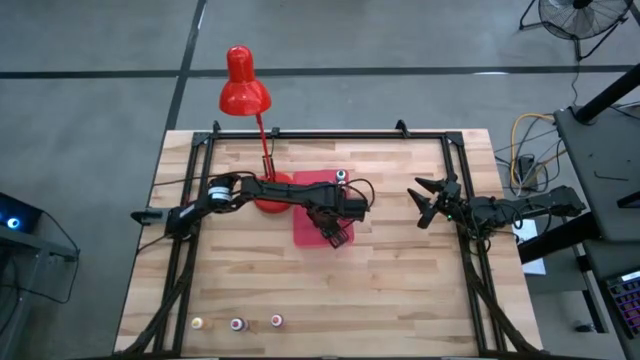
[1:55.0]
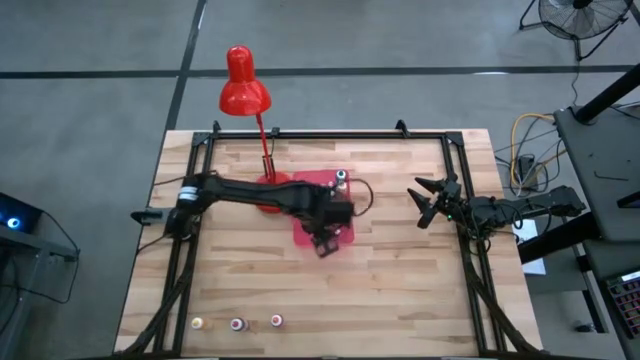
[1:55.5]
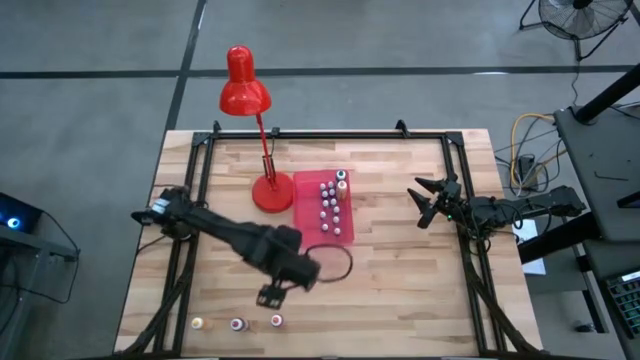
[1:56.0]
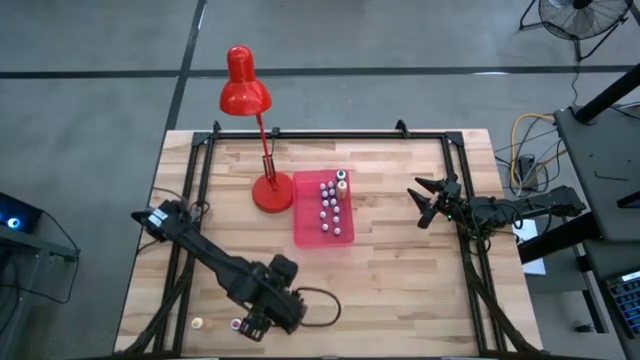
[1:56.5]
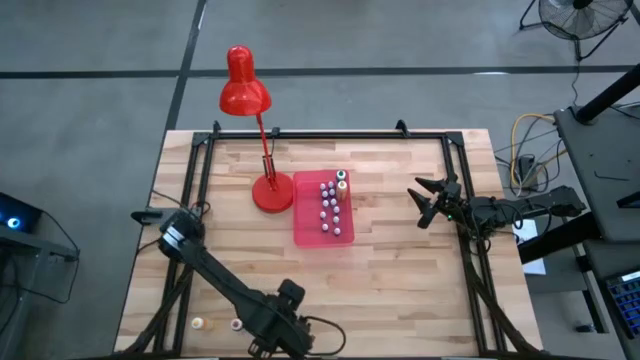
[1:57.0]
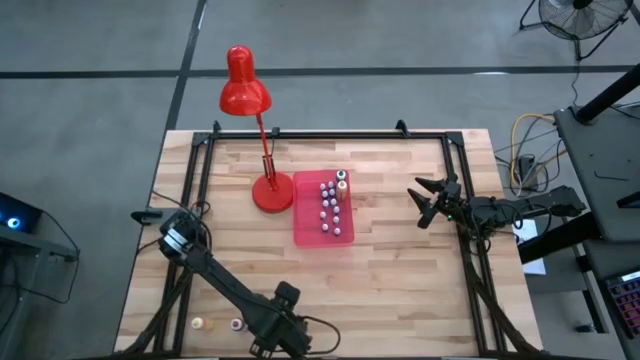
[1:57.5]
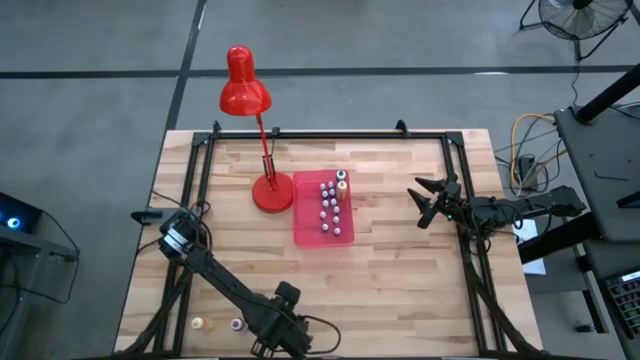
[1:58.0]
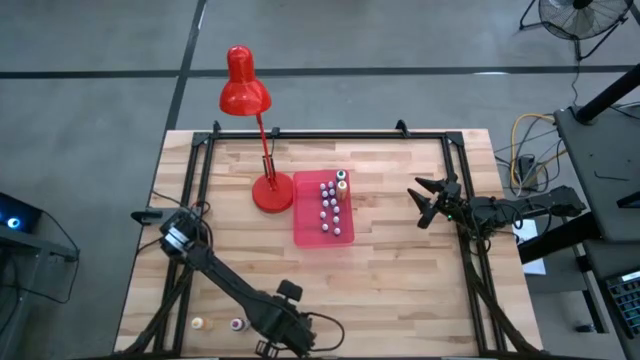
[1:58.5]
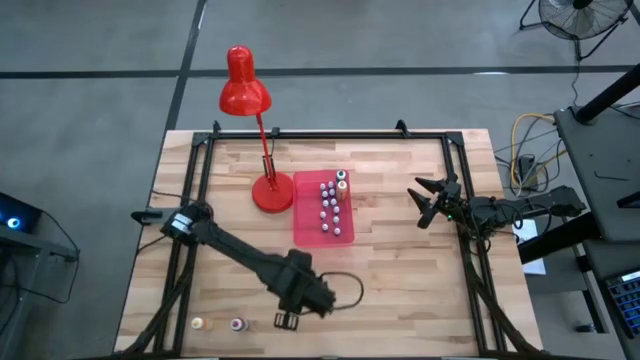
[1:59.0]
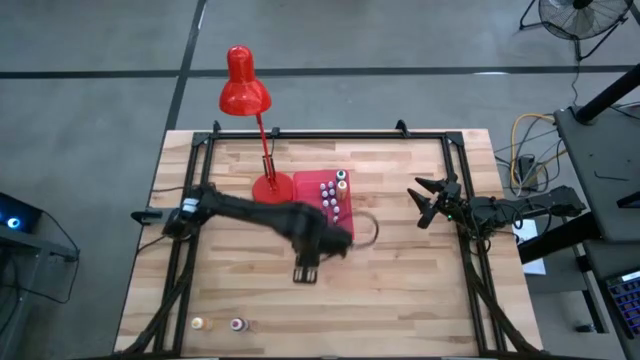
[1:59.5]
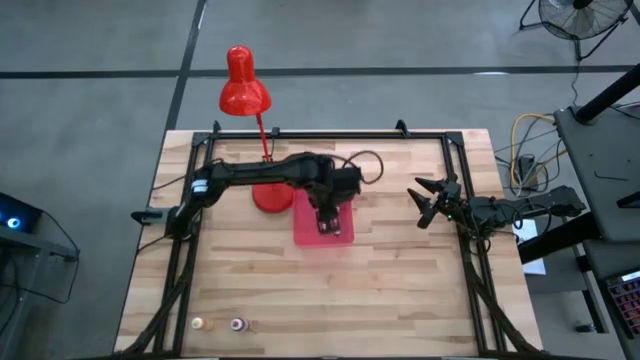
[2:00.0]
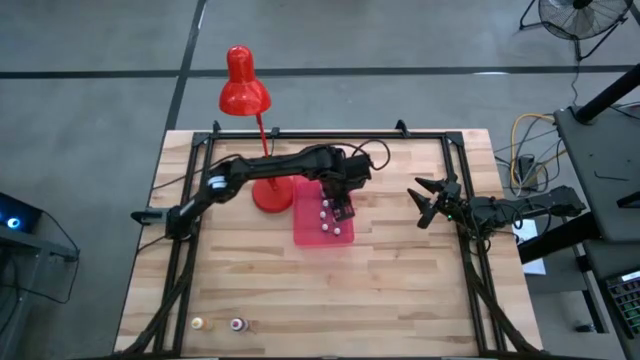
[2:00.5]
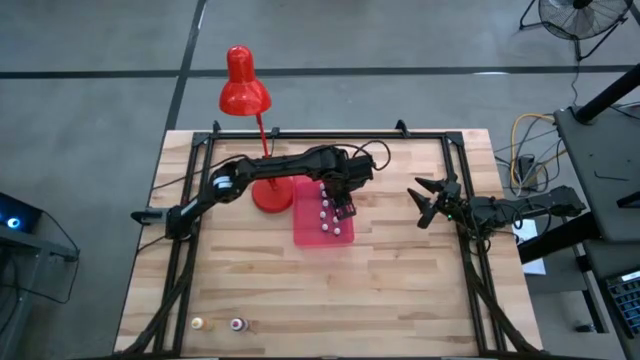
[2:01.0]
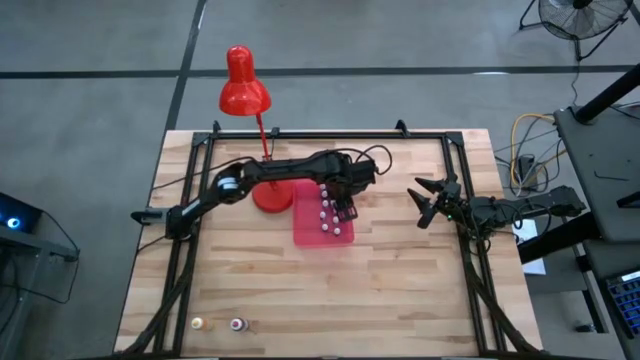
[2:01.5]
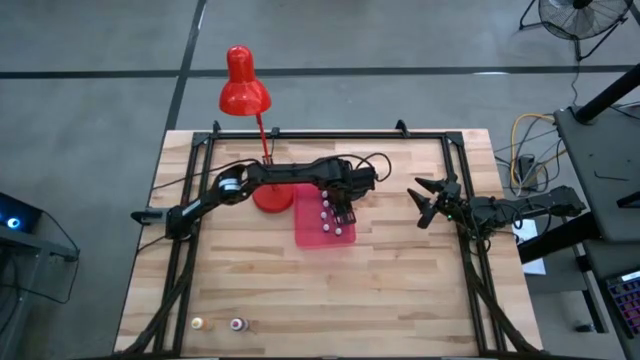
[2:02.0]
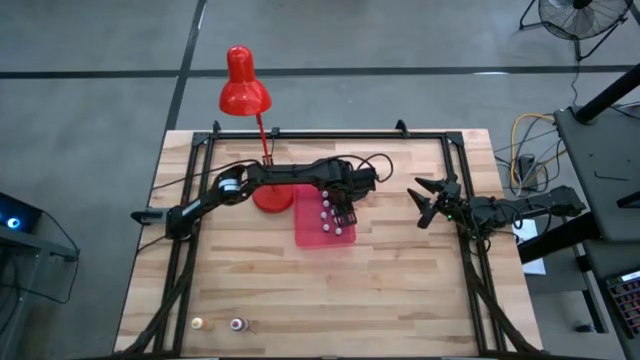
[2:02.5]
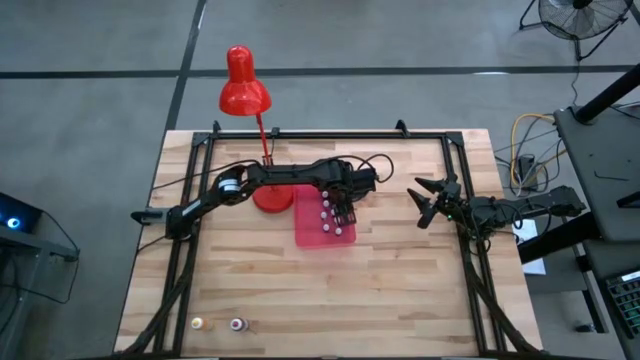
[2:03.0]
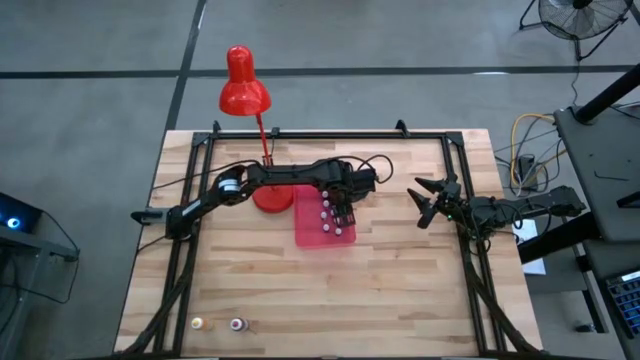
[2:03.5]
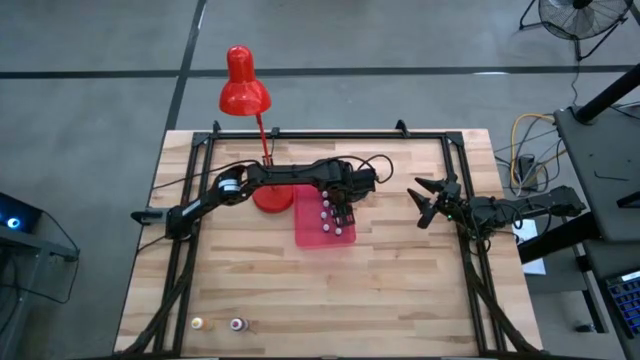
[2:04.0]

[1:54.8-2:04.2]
Task: Pick & Place food coloring
Put the big orange food coloring bottle into the bin

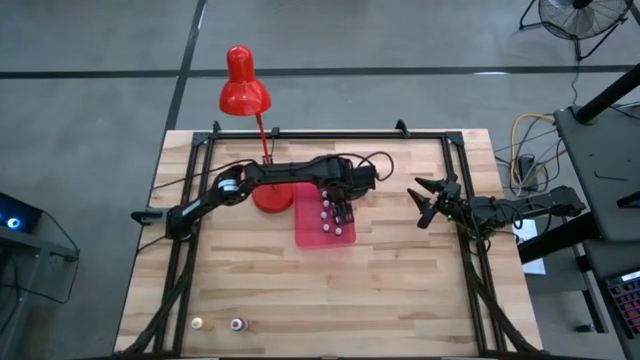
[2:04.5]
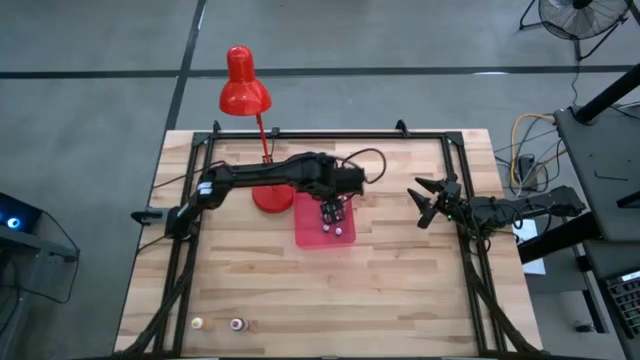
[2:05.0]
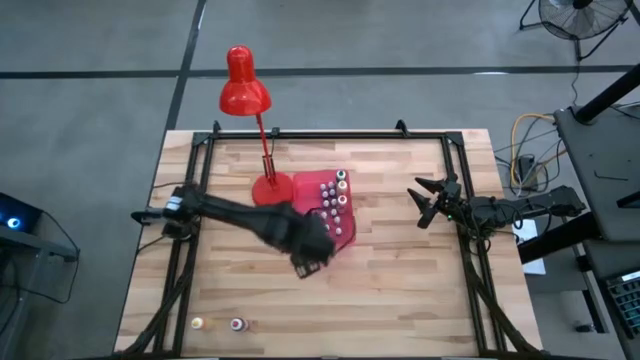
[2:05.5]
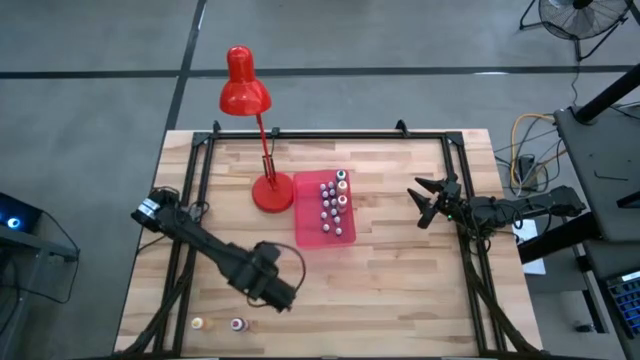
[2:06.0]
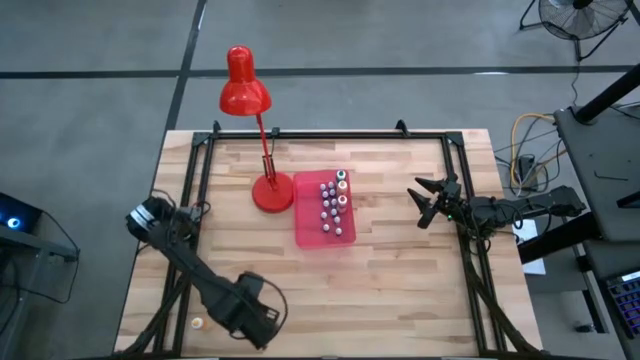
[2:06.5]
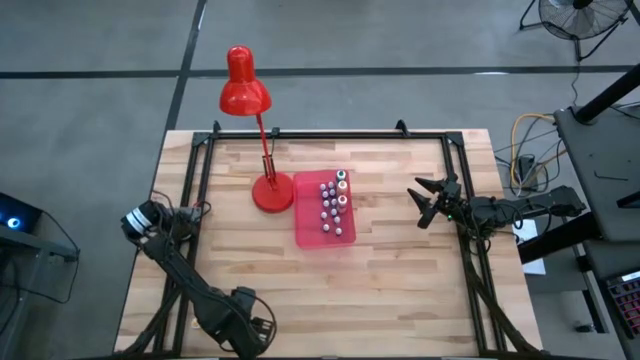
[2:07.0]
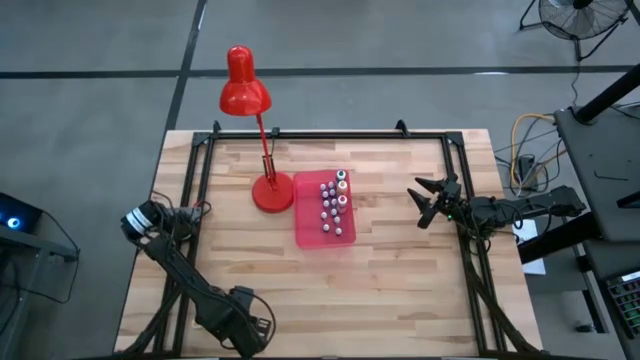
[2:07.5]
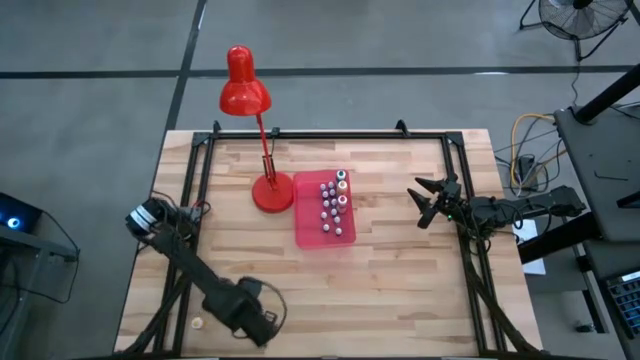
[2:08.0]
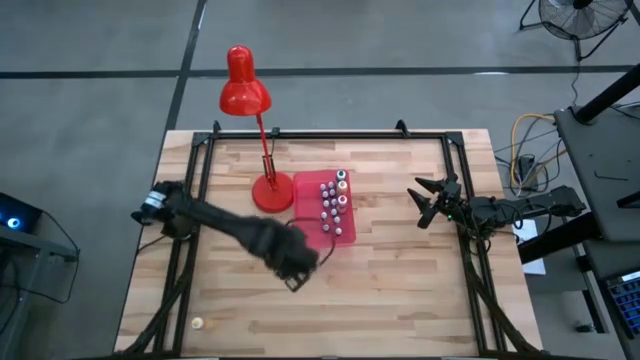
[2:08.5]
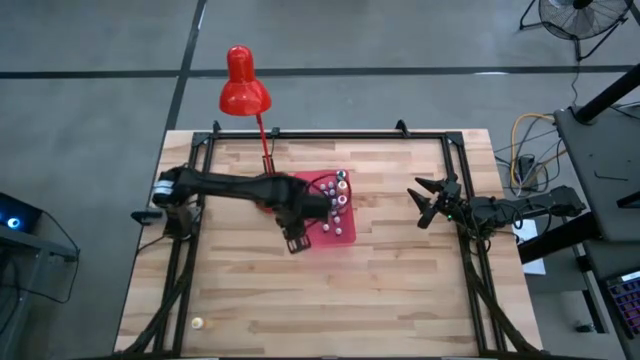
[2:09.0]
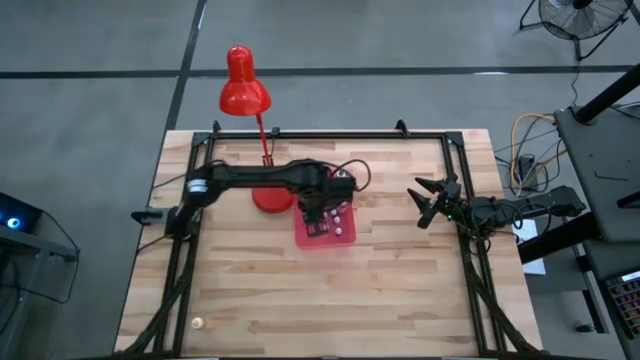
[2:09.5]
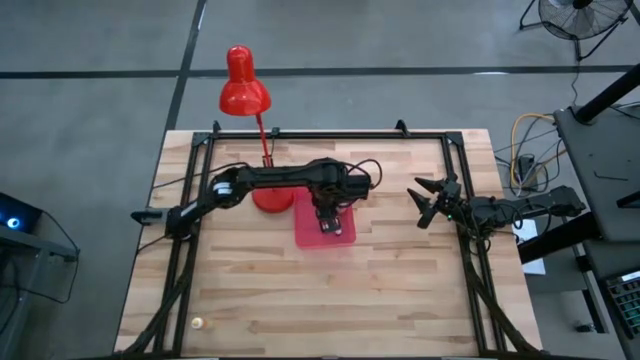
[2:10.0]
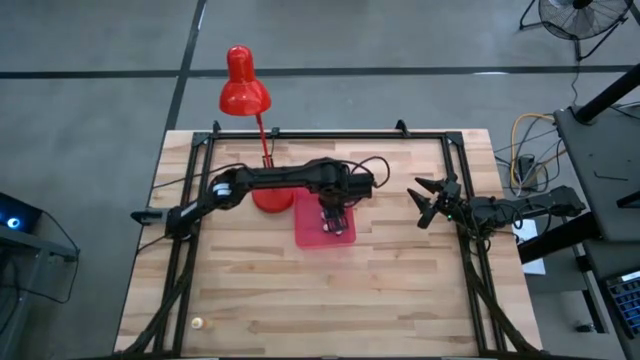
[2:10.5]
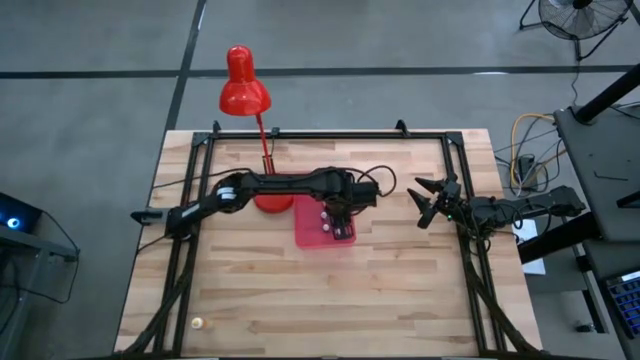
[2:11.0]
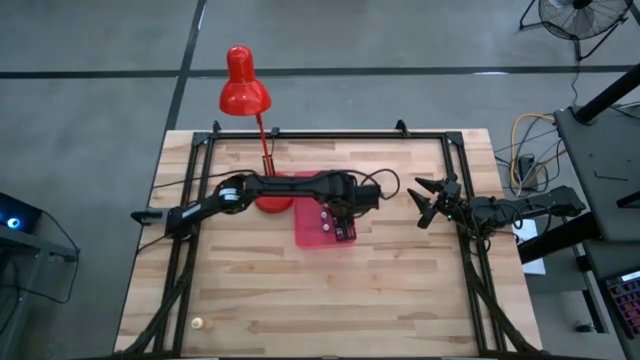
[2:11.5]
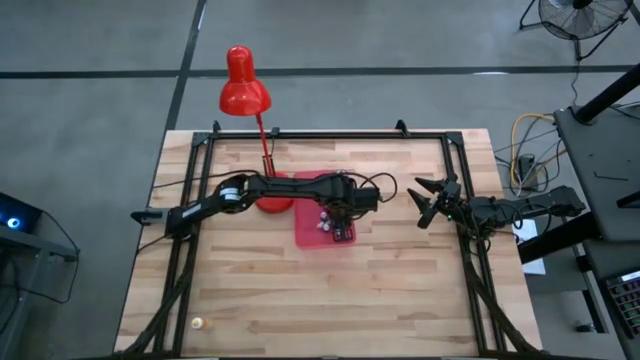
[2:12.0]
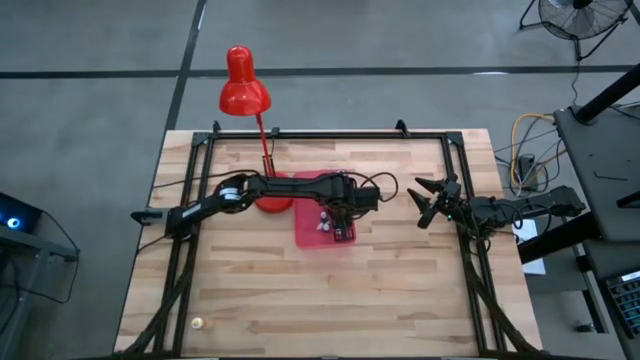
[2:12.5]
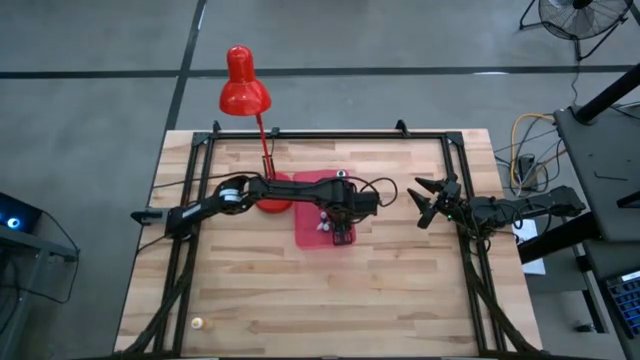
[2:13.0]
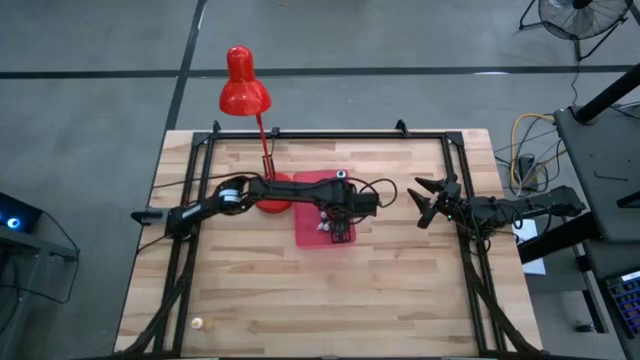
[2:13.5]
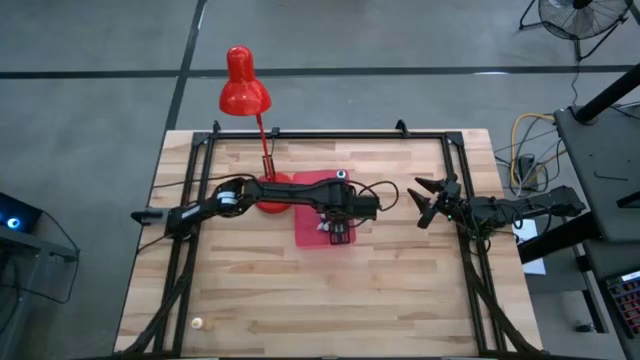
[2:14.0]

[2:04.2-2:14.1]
Put the big red food coloring bottle into the bin

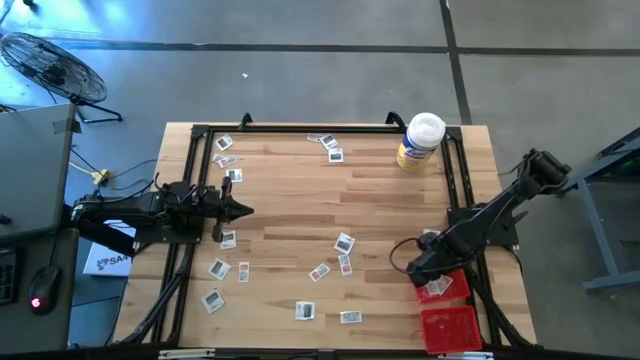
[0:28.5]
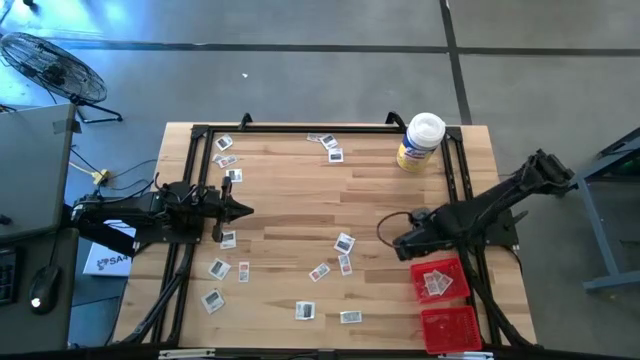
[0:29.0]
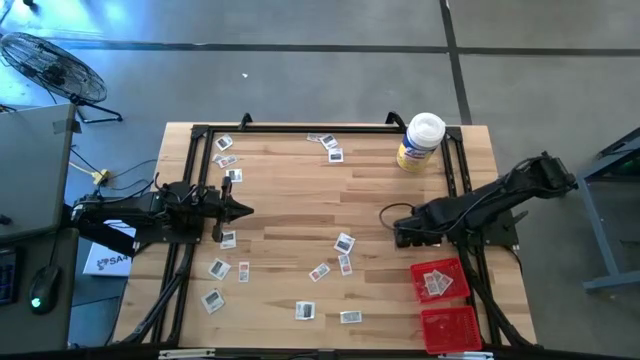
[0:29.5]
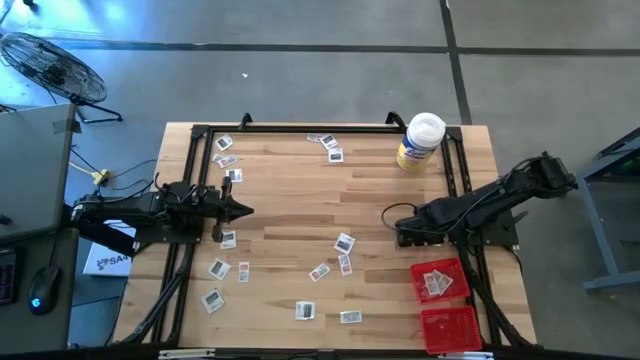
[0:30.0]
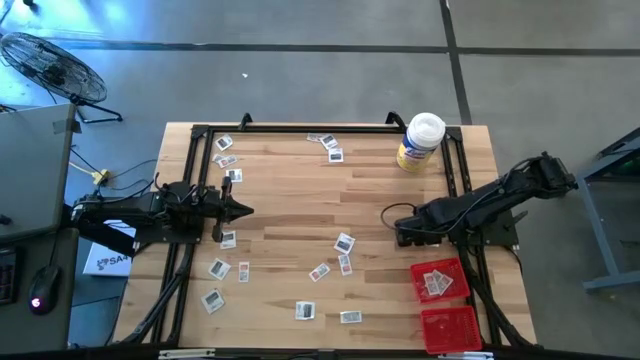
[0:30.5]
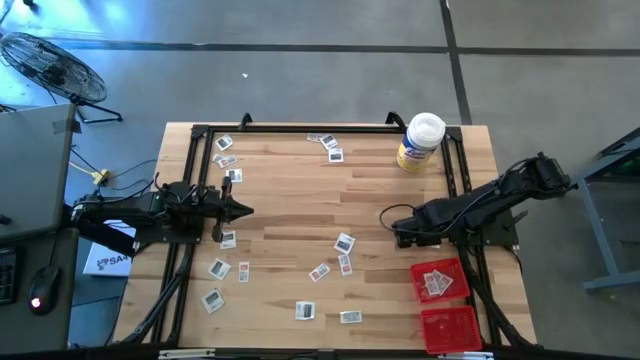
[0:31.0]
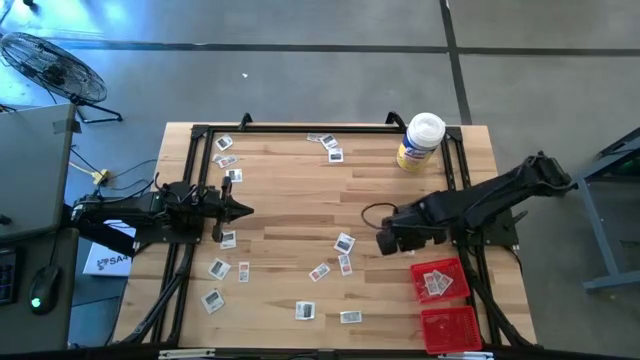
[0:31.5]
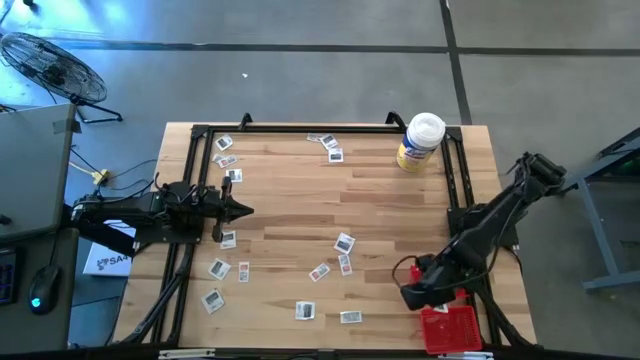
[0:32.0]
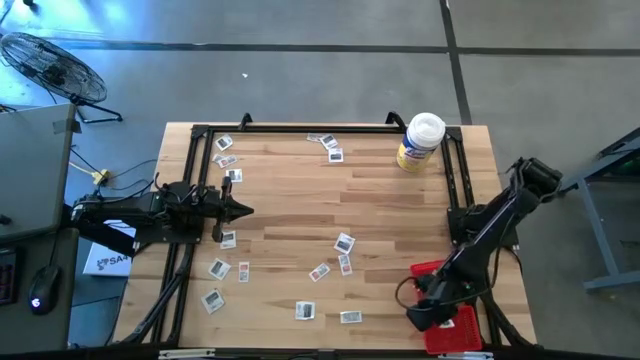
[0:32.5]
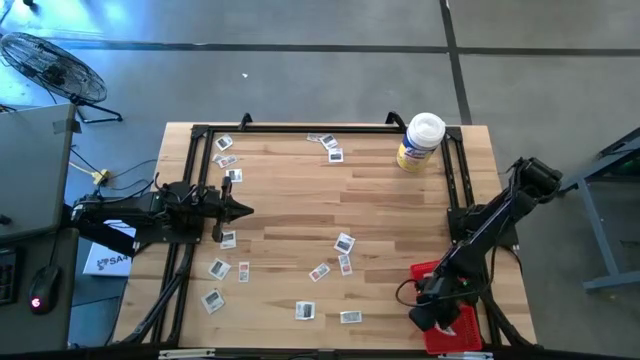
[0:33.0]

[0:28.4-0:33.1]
Task: Pick & Place First Aid Supplies
Put the white towelette pack into the bottom red bin
